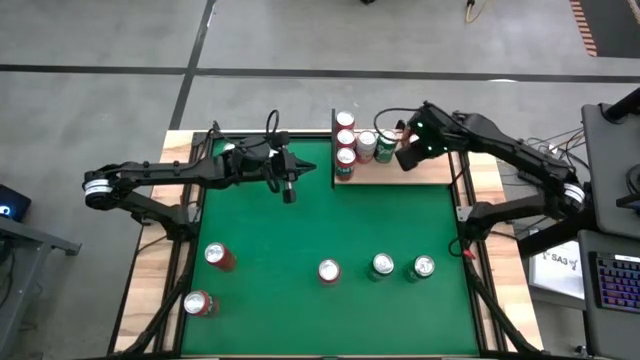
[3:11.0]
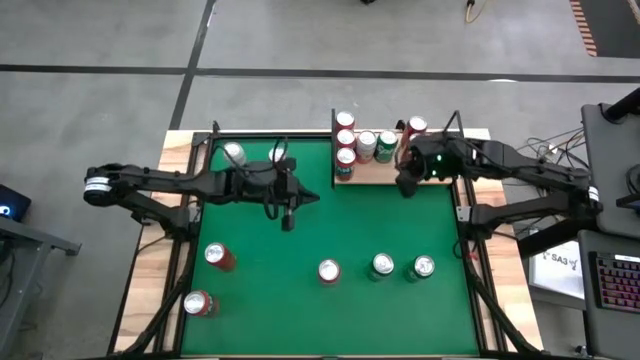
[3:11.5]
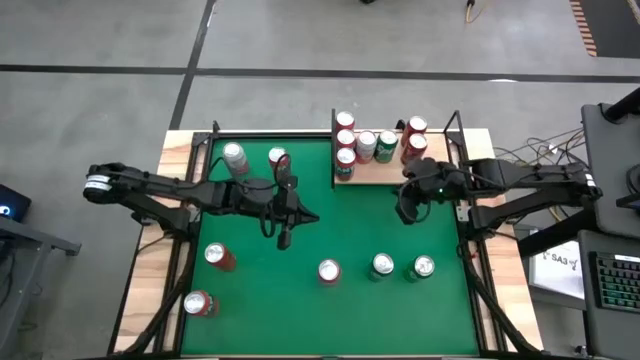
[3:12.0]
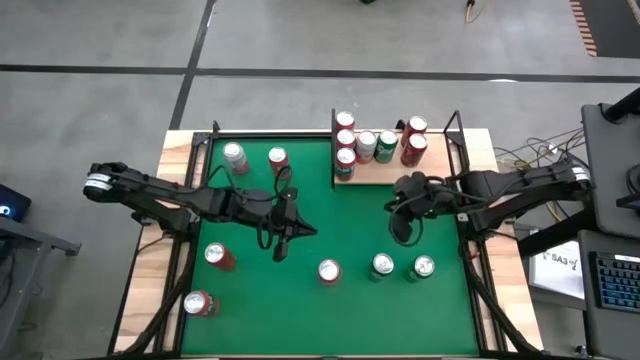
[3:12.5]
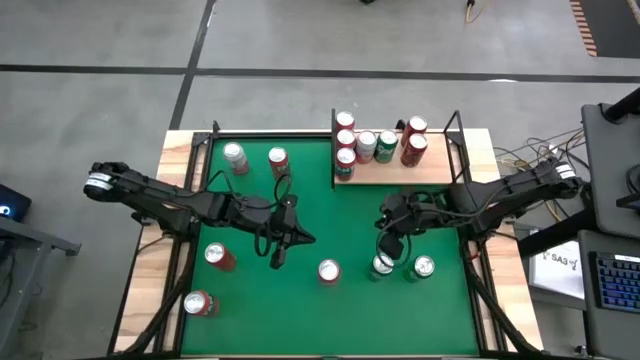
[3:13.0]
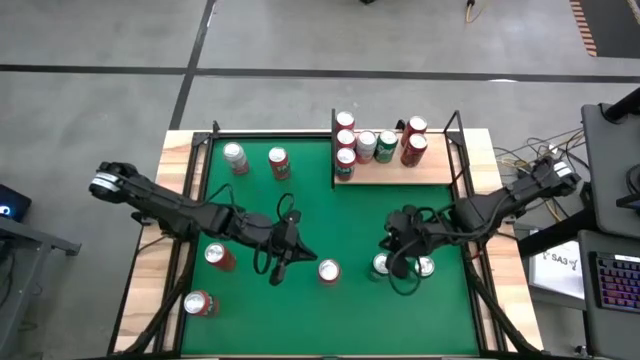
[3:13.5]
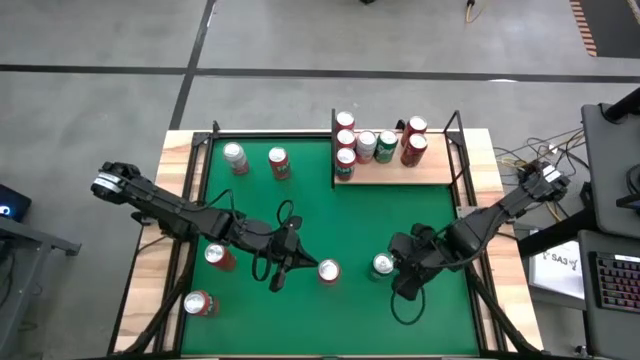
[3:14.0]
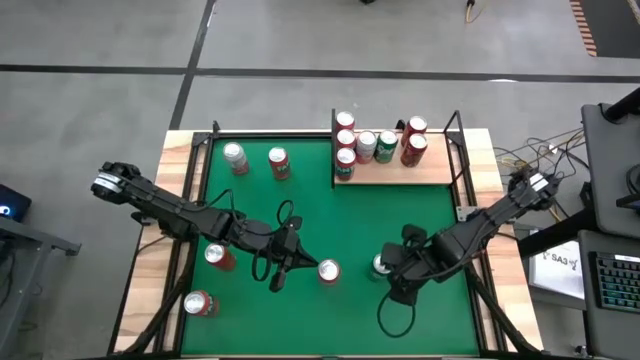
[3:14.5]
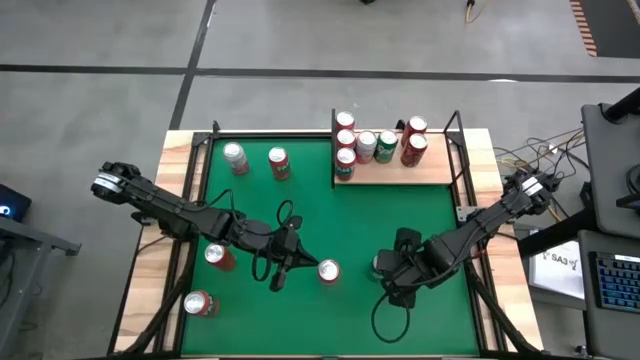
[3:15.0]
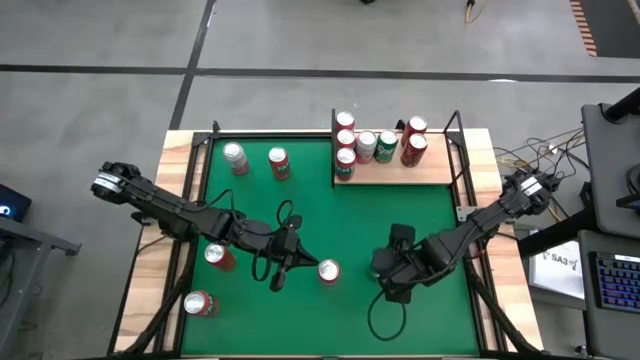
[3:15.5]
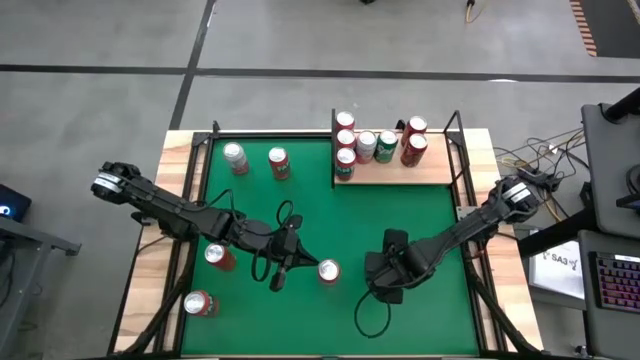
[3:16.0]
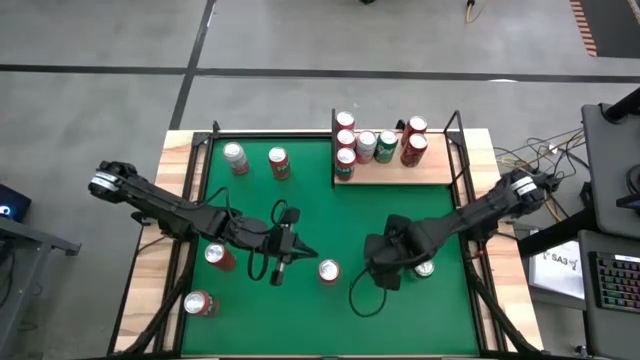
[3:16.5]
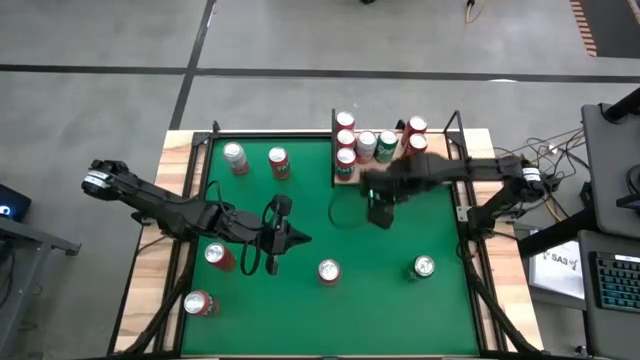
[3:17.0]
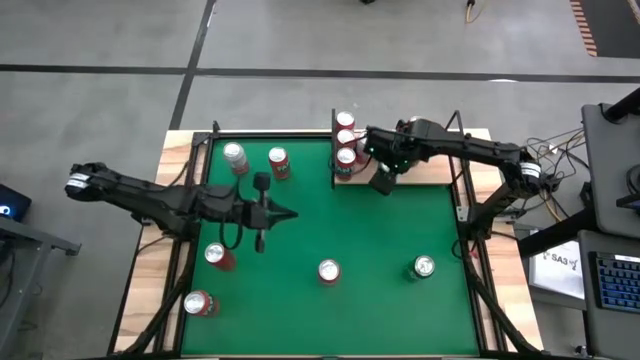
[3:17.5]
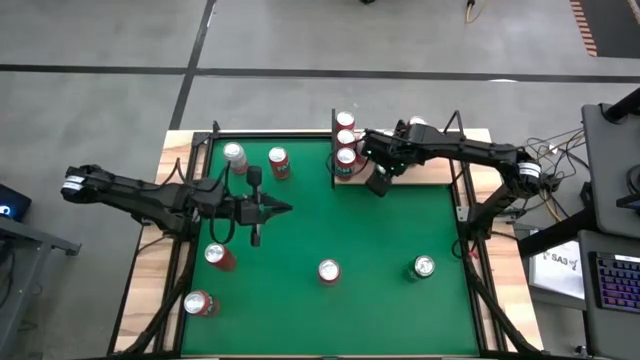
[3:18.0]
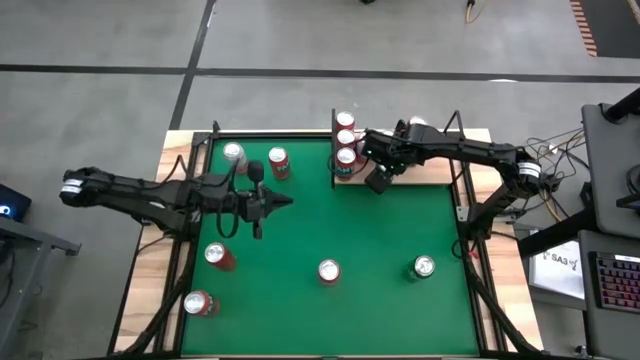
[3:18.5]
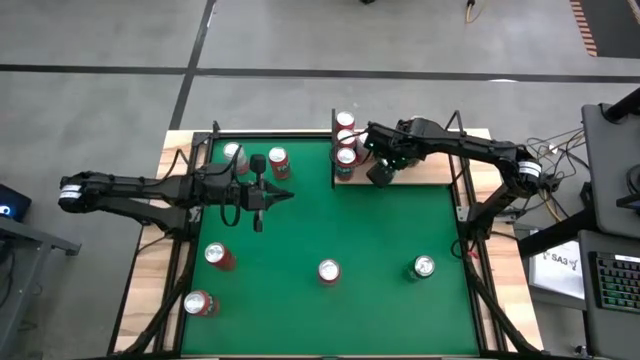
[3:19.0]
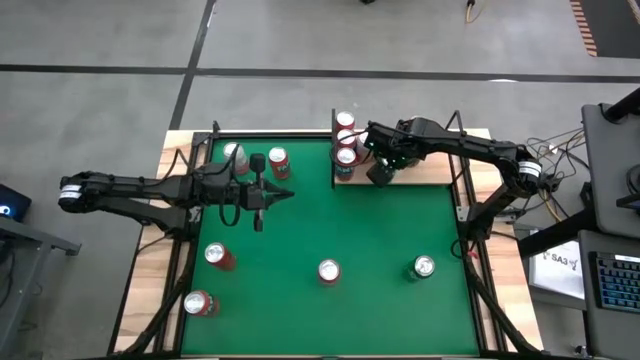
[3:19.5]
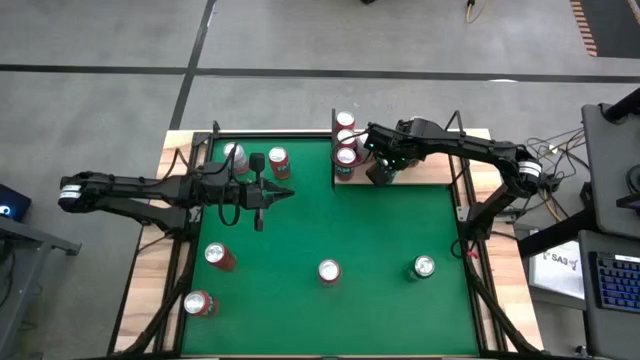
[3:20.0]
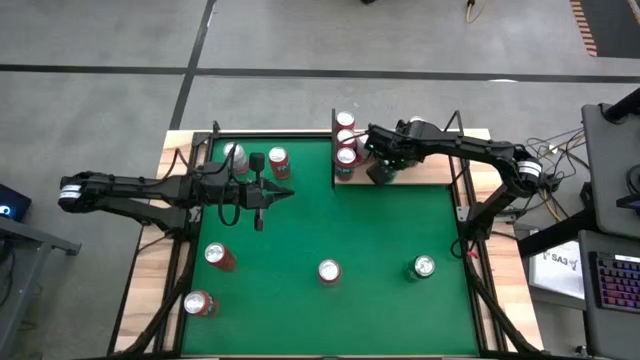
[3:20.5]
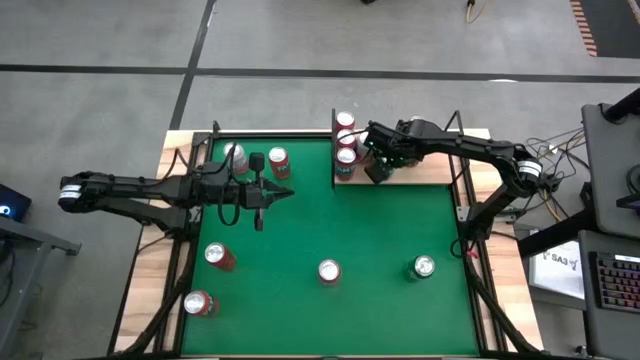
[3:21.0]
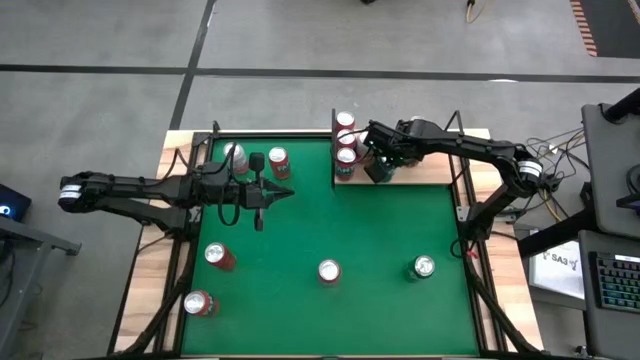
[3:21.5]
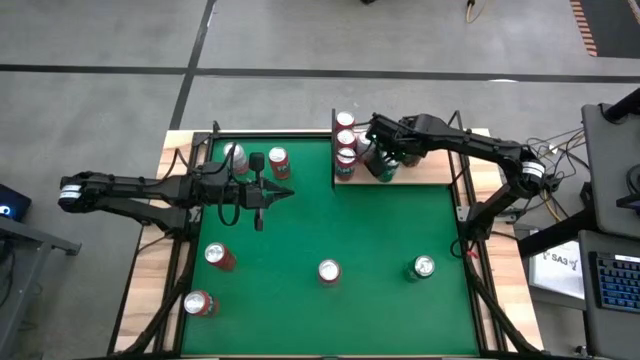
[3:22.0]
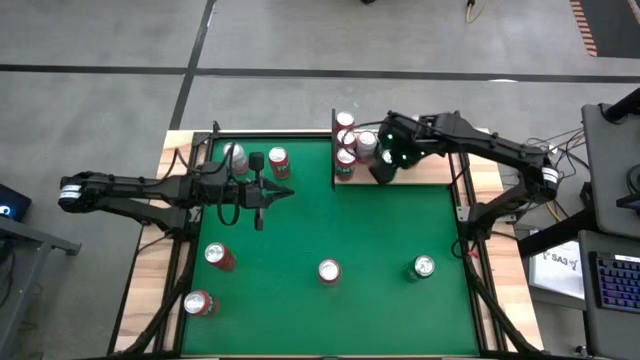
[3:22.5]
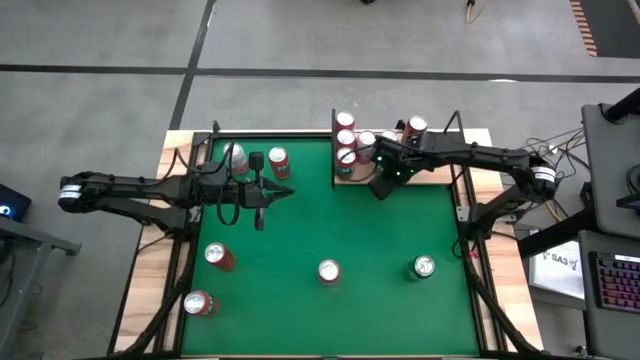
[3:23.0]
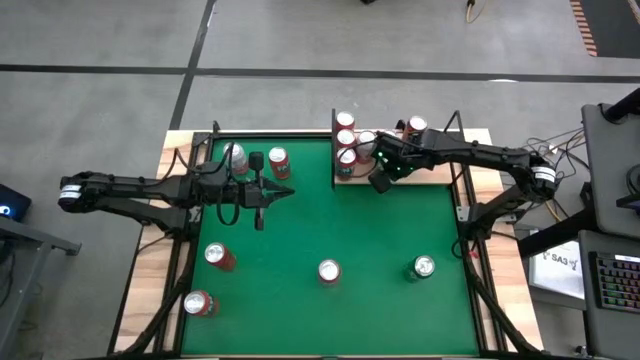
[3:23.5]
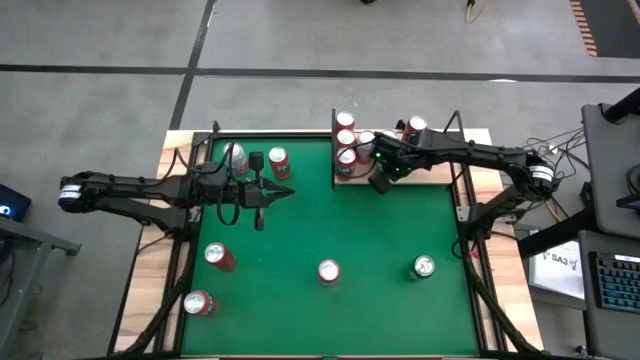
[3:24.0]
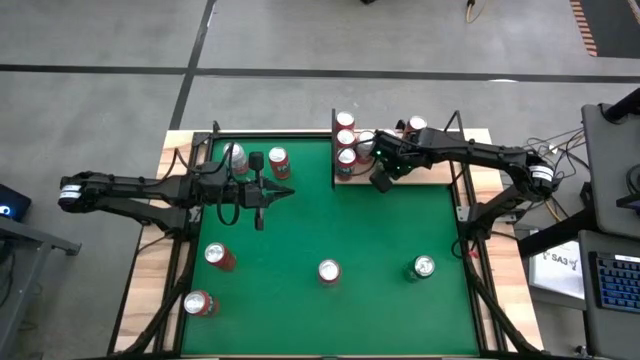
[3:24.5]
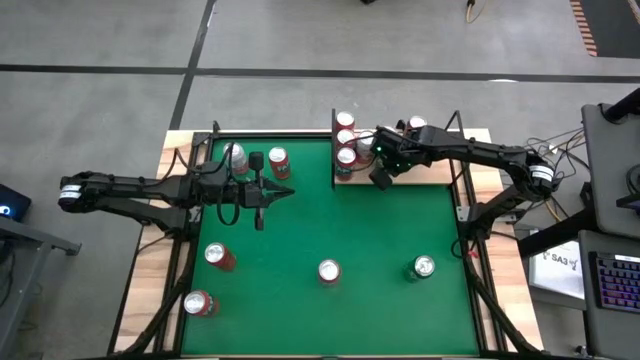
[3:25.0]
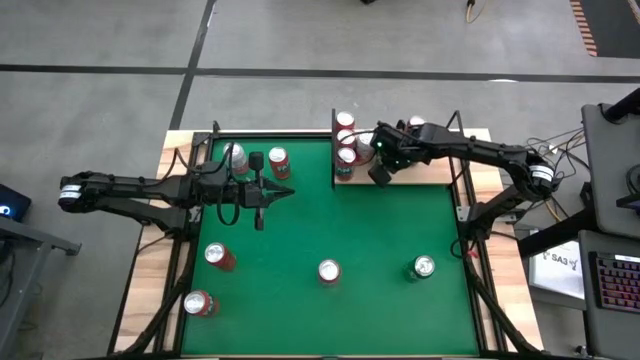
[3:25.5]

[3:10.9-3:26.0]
Task: Place canned beverage on shelf
Put the left green soda can on the shelf aligned with the other green soda can

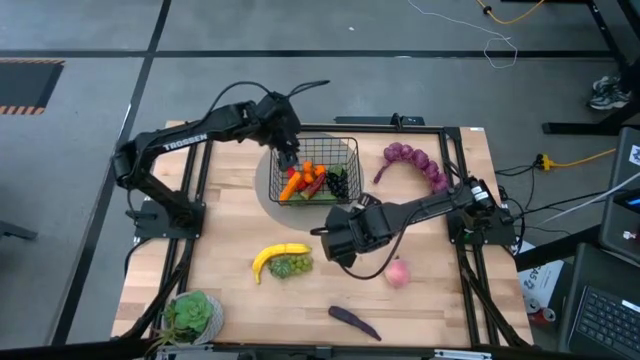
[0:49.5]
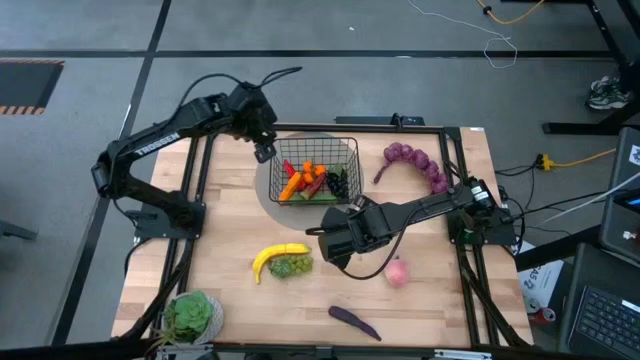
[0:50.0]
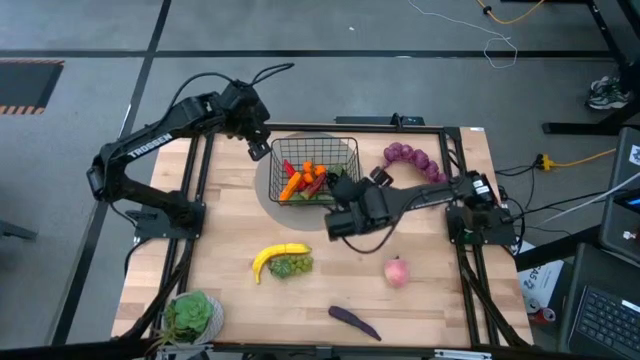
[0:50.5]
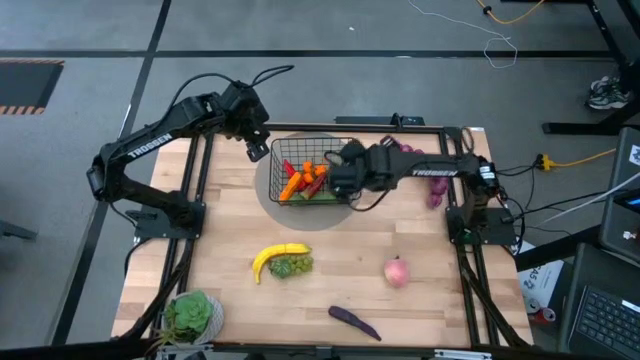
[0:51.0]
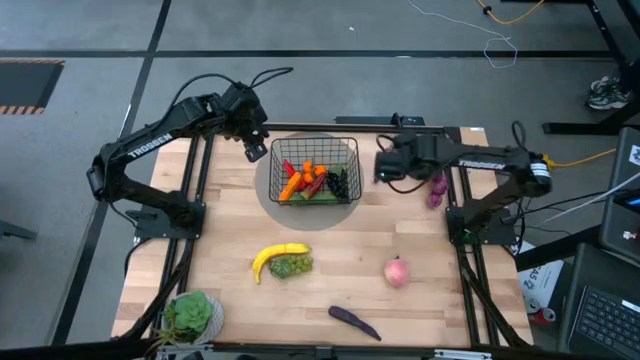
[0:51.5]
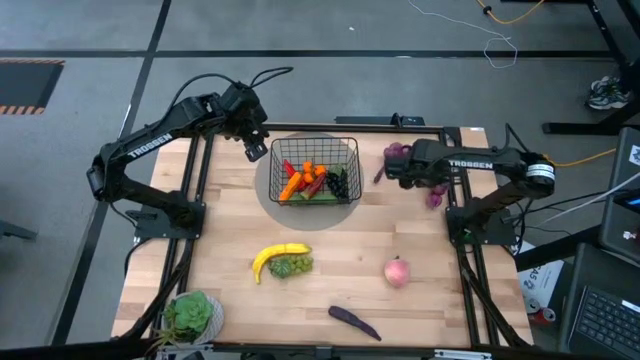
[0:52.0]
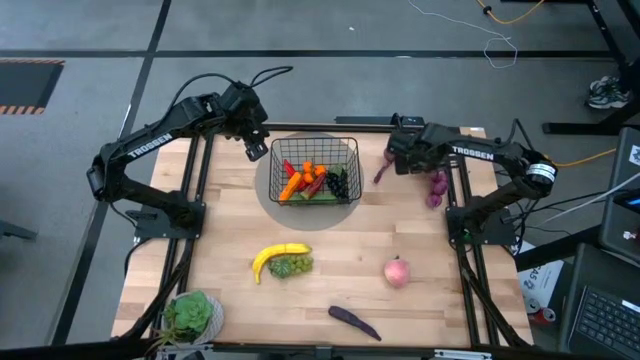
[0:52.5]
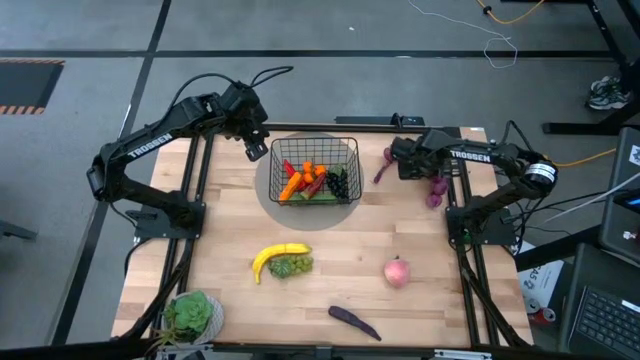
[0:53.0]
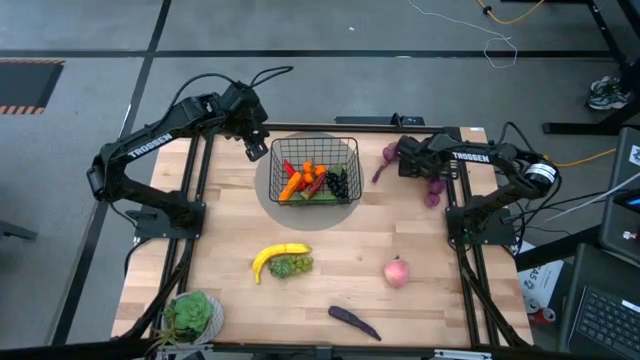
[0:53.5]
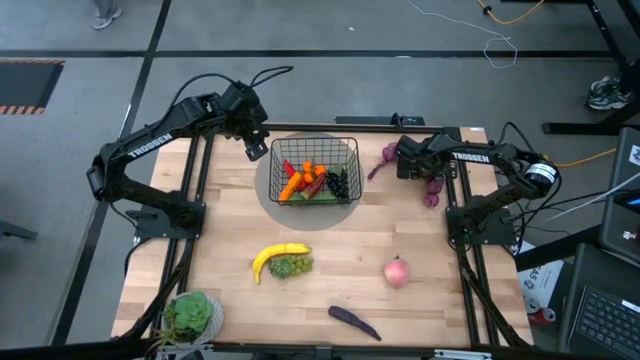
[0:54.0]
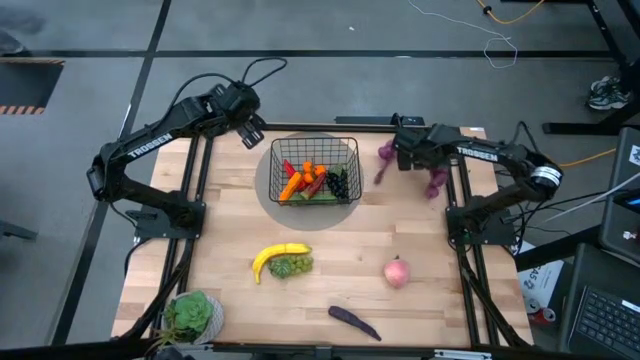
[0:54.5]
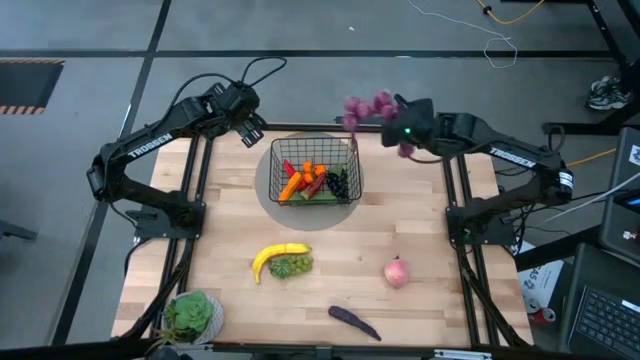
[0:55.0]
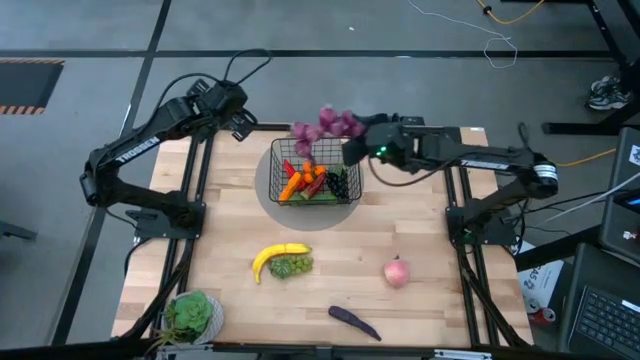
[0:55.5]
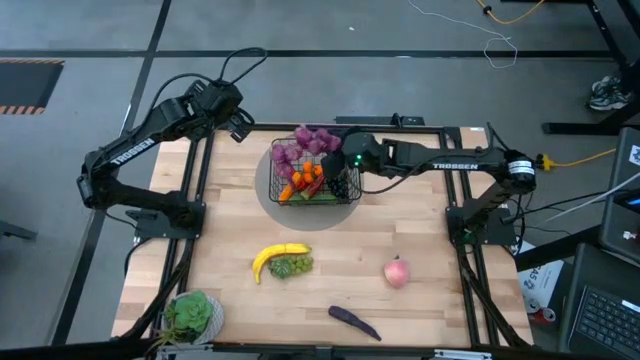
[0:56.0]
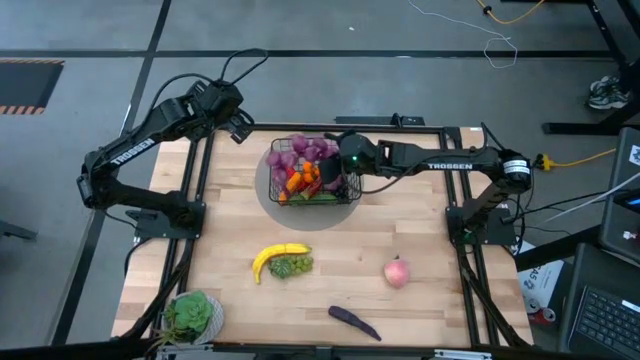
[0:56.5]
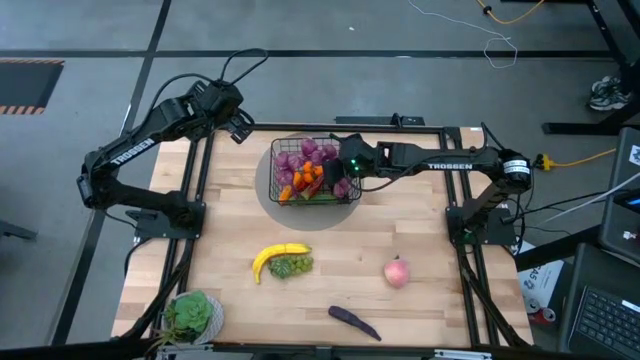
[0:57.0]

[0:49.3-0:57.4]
Task: Build produce basket
Put the purple garlic into the wire basket
